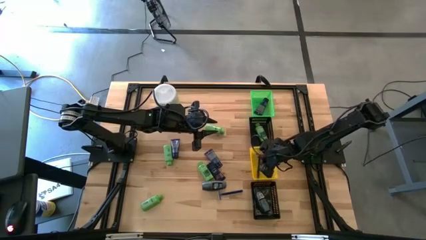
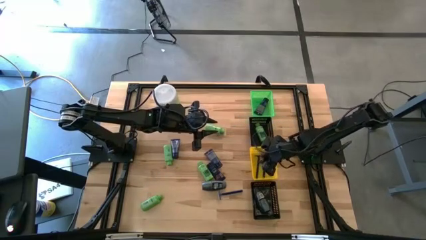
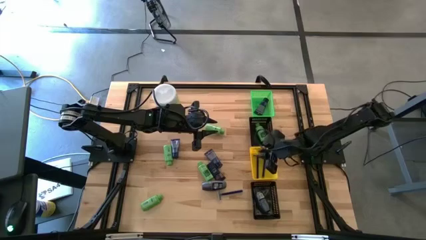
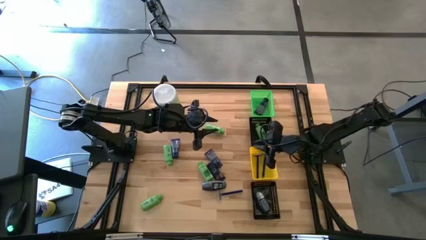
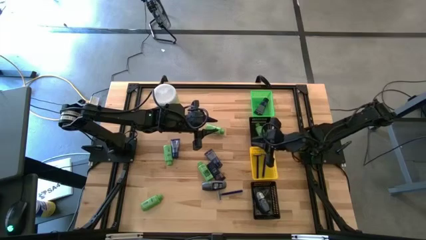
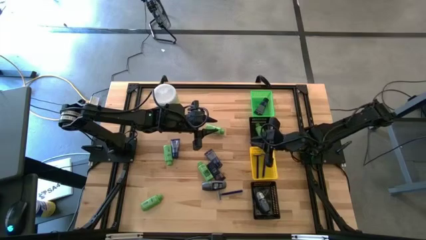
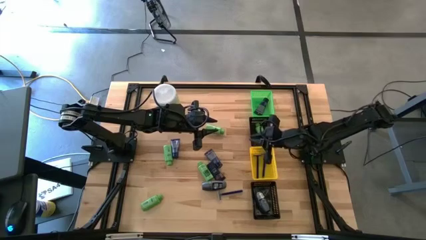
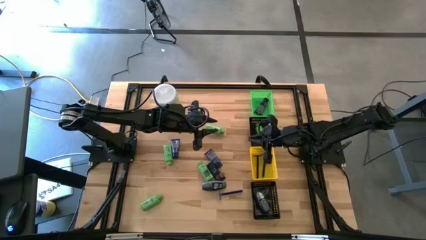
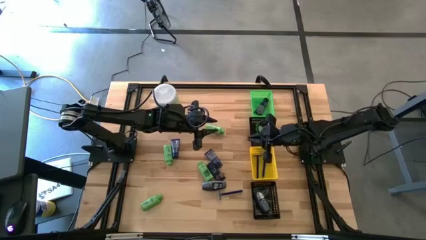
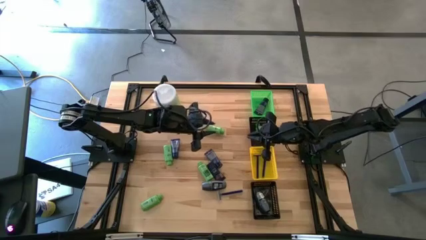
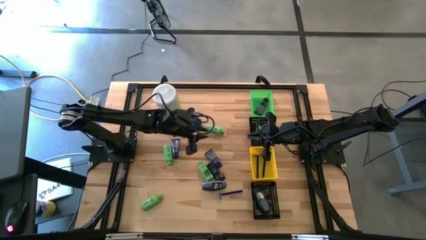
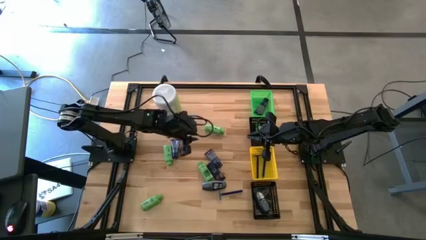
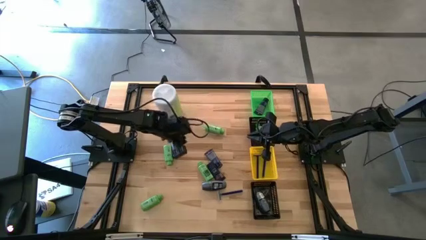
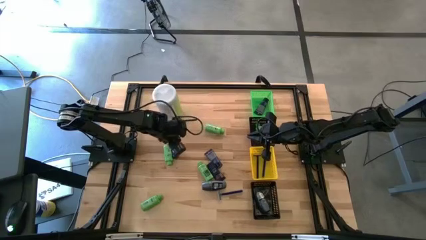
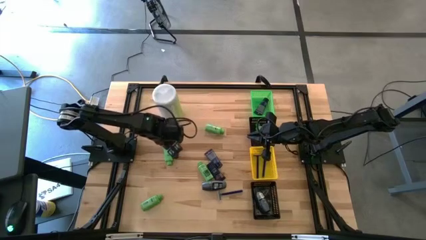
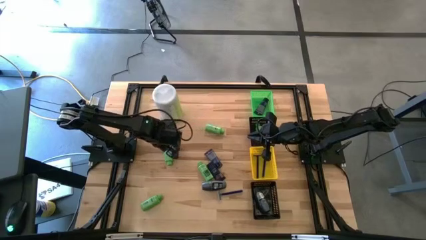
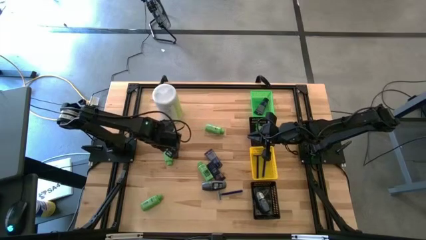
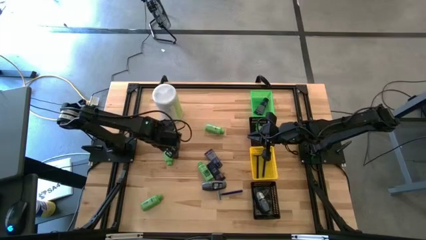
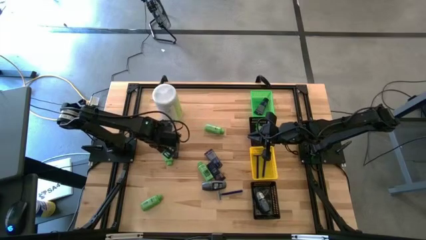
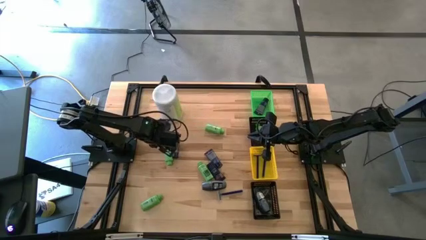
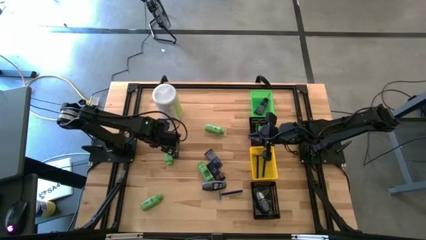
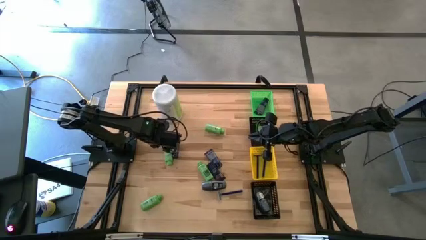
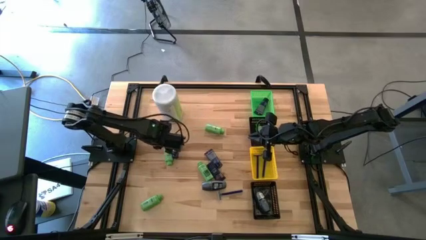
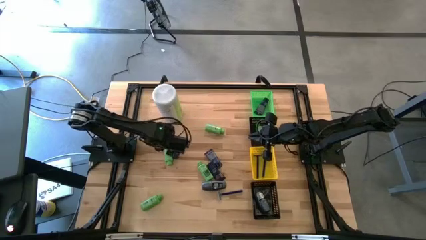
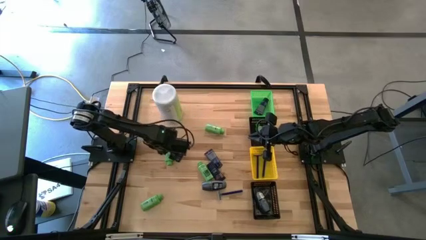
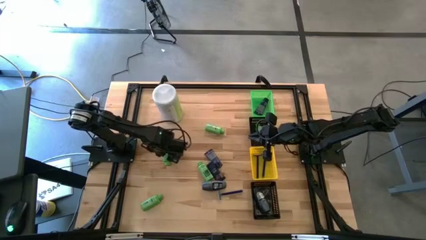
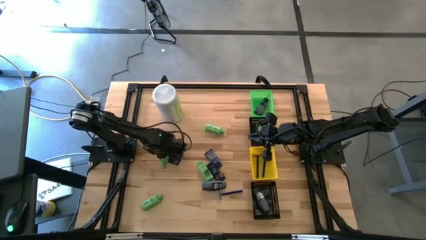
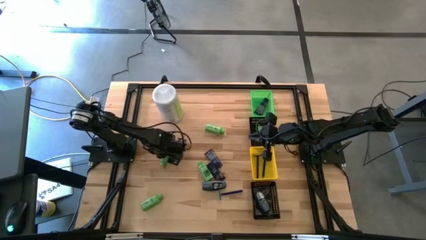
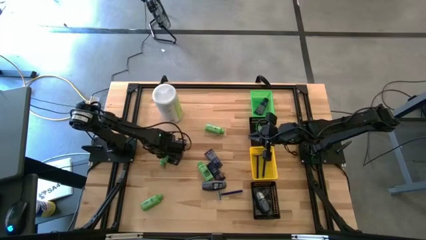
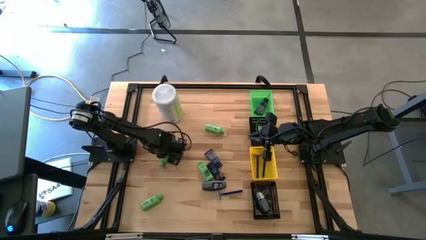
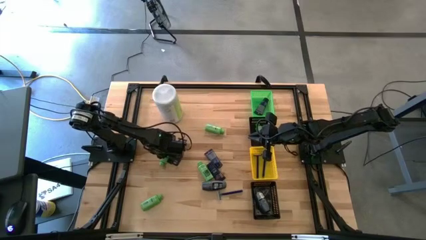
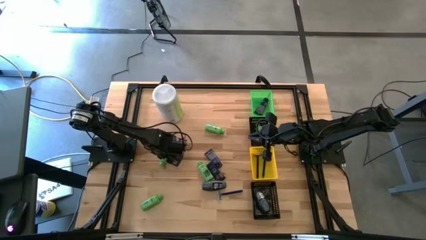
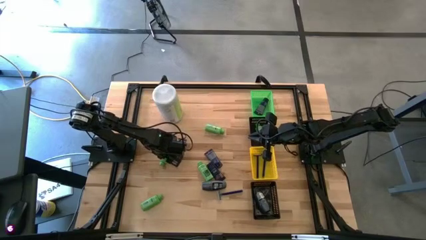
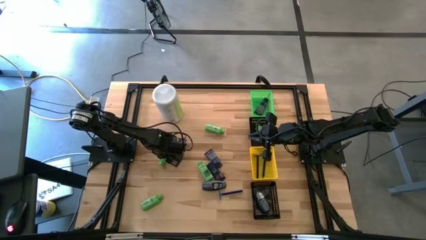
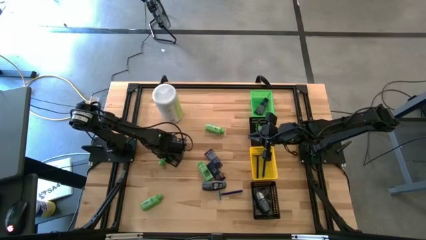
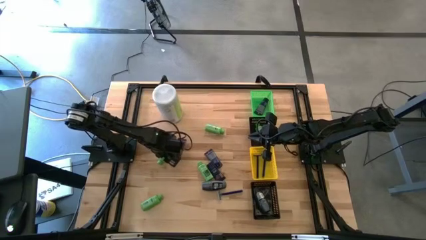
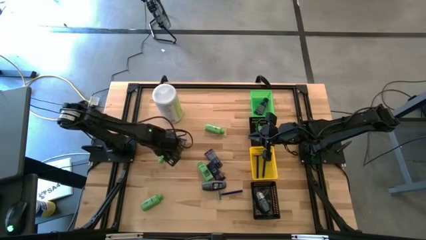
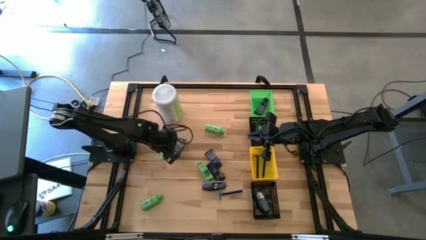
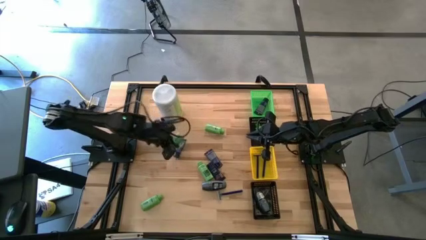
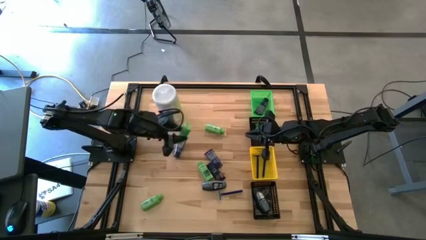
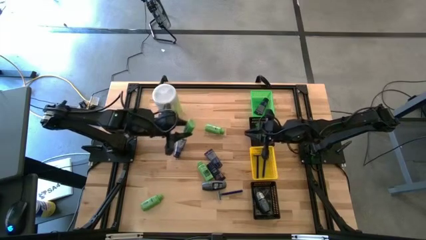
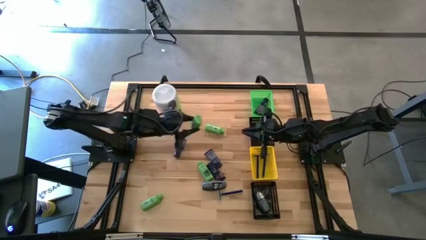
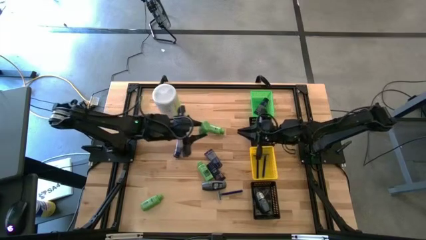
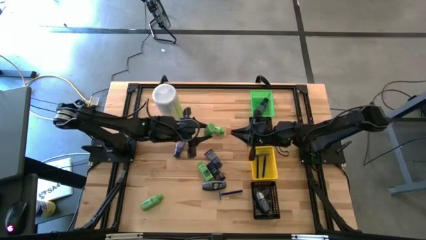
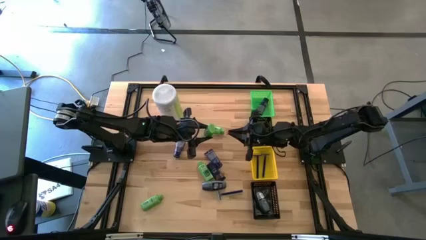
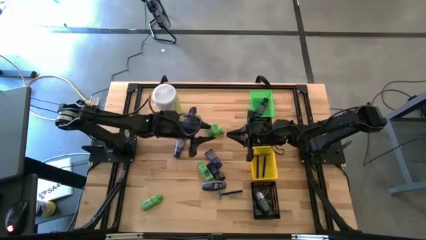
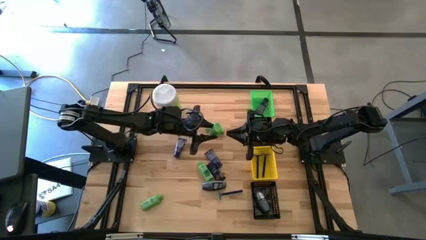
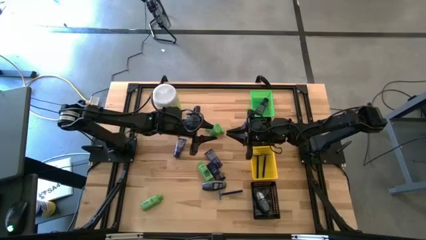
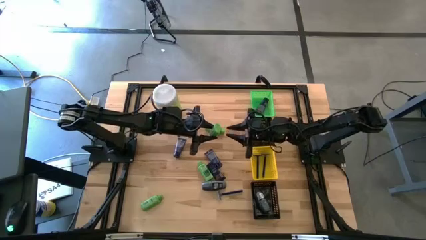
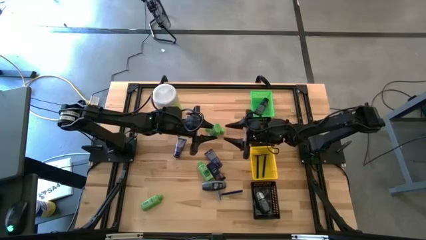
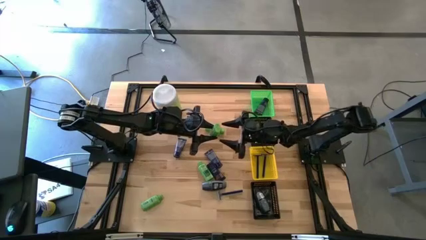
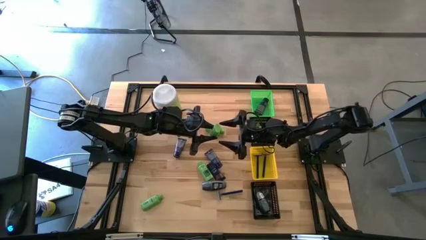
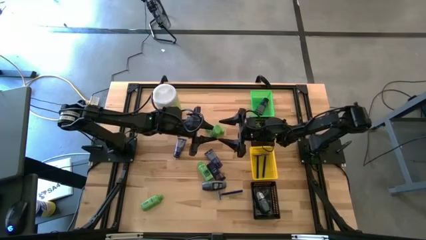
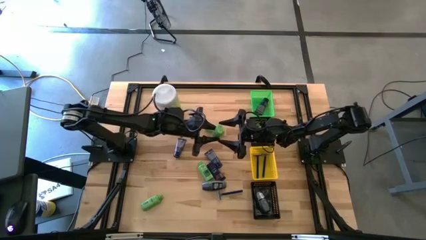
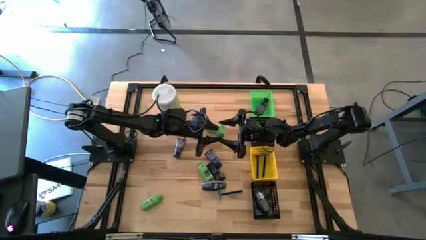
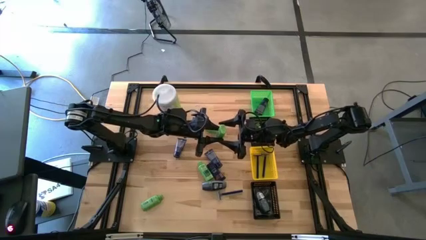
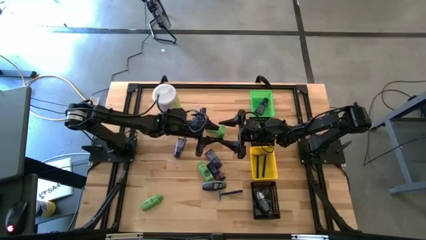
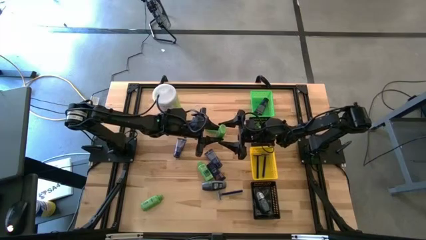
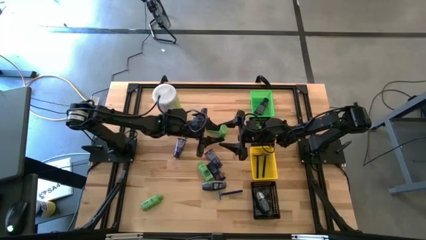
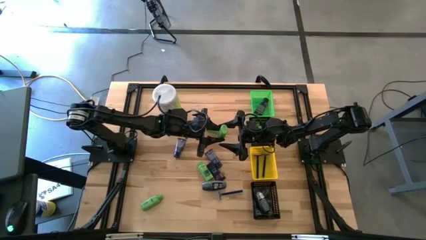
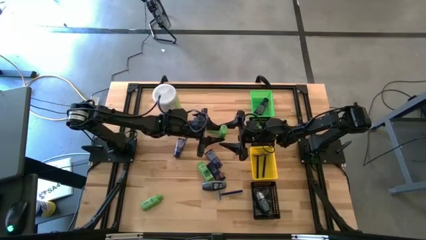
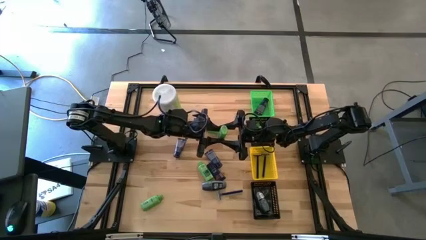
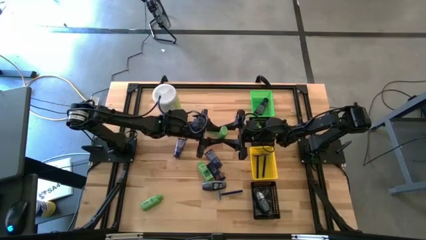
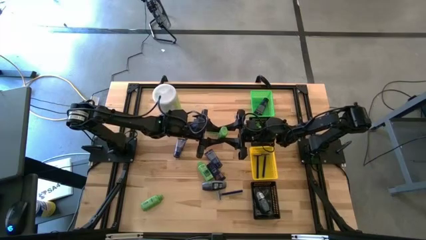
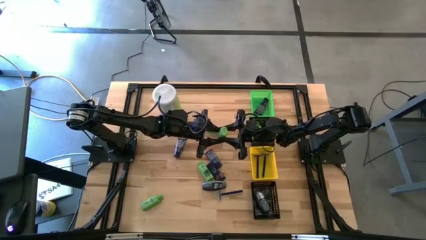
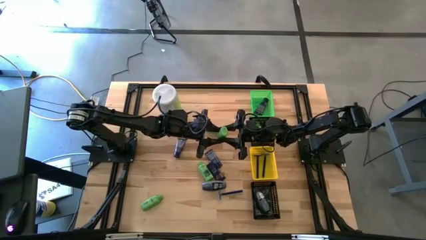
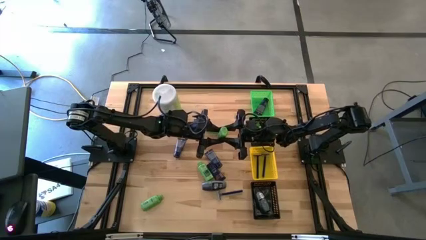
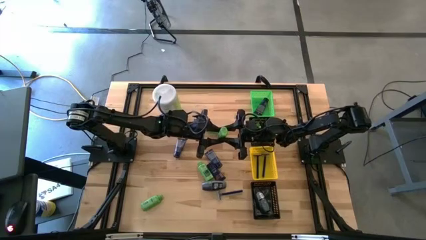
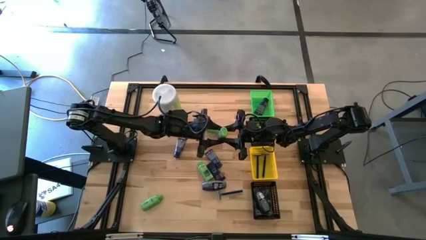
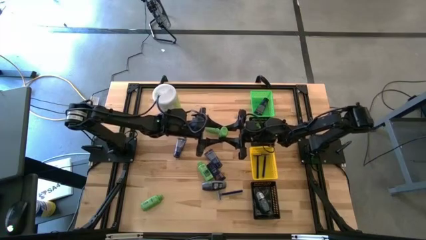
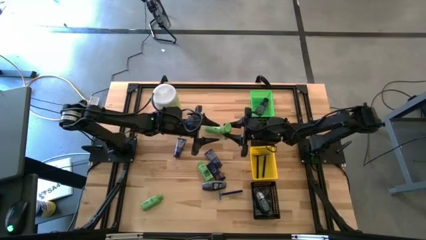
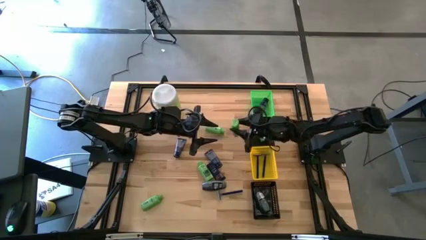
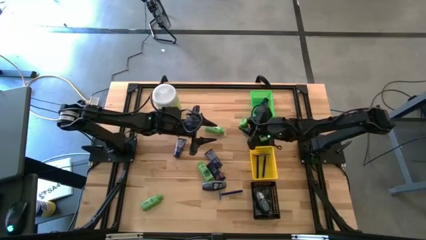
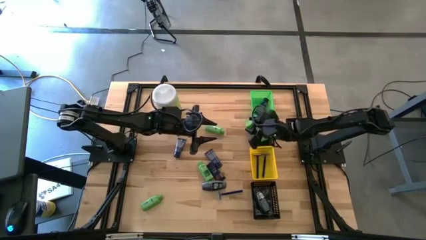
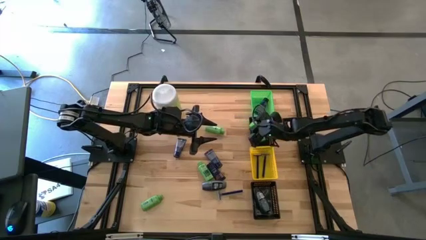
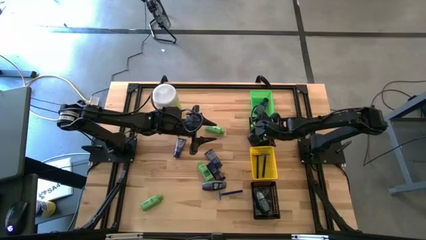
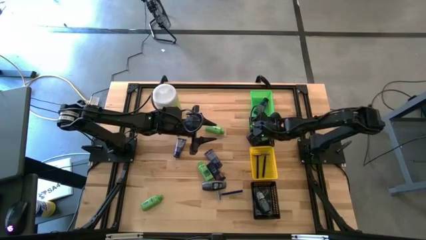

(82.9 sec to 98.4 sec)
Task: Pick & Place Travel size toiletries
Put the green shampoo into the top black basket

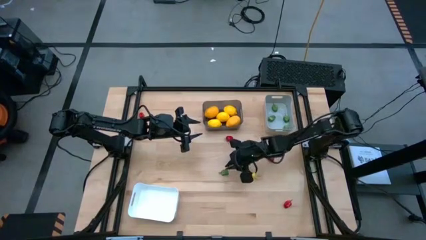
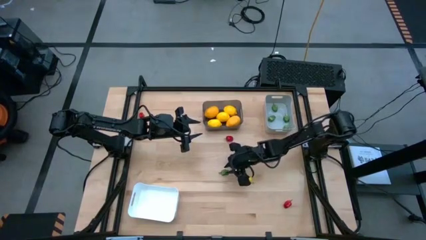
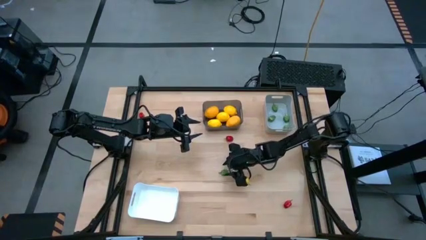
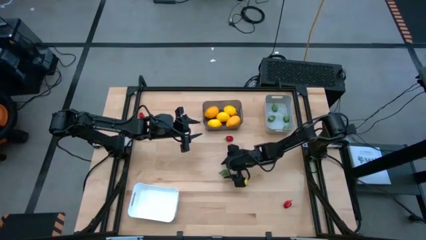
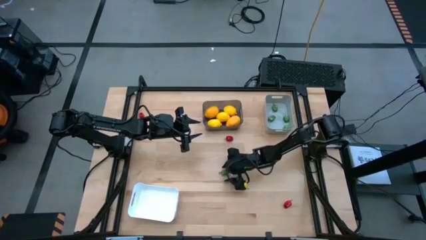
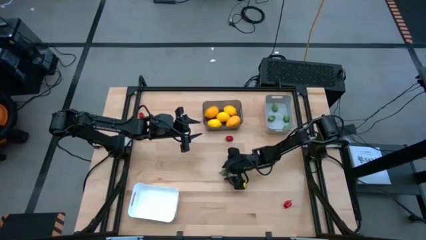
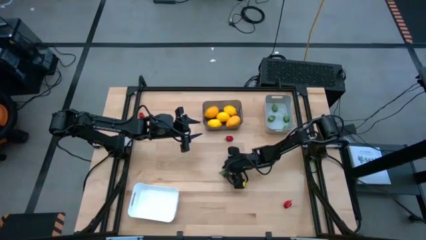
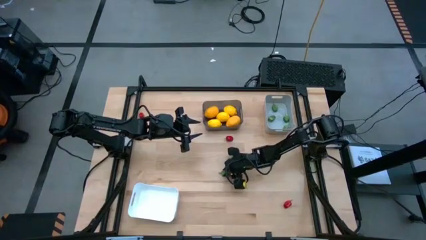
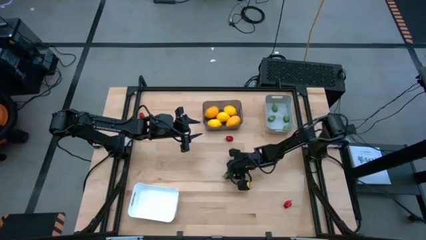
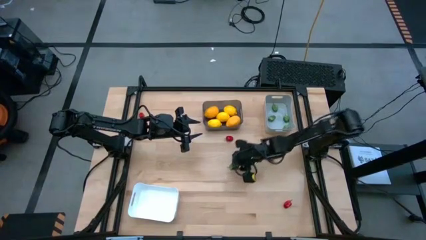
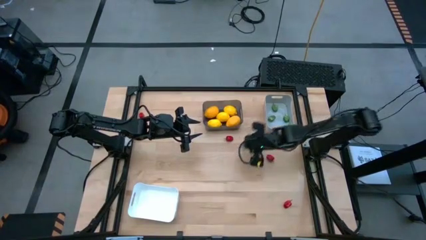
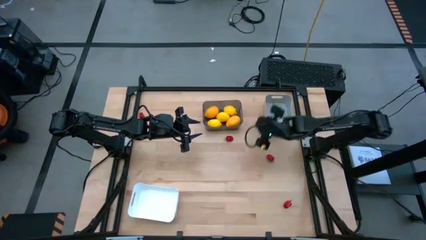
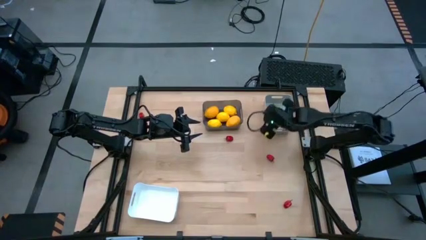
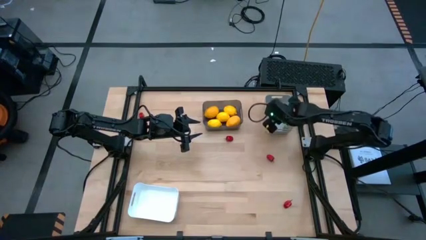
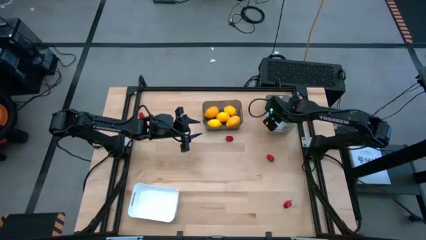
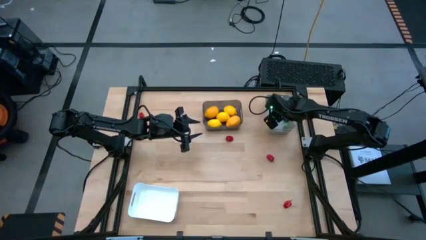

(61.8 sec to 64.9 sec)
Task: Sort produce into baskets
Put the green pepper into the gray bin
